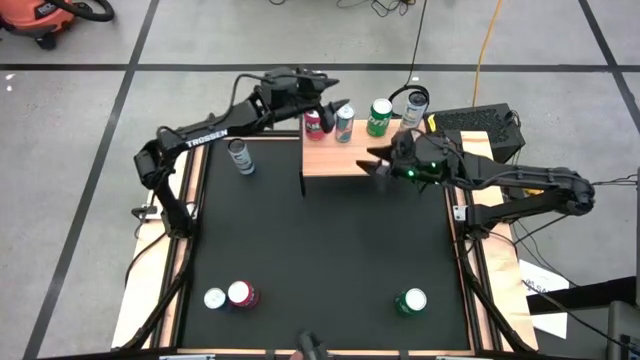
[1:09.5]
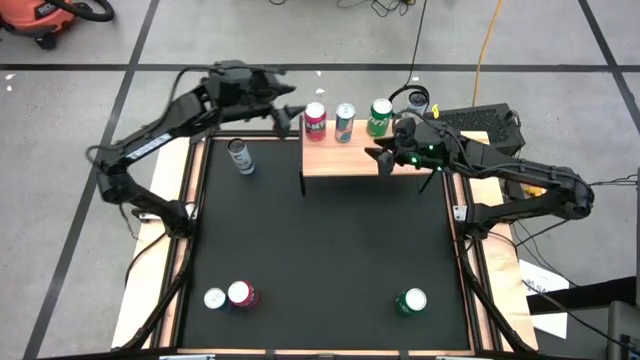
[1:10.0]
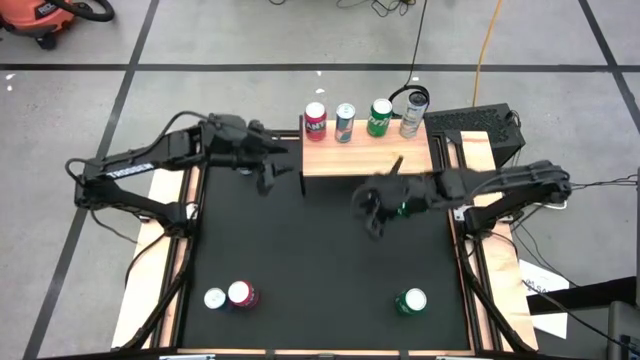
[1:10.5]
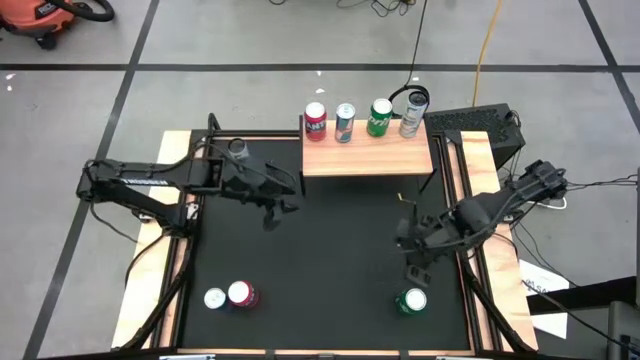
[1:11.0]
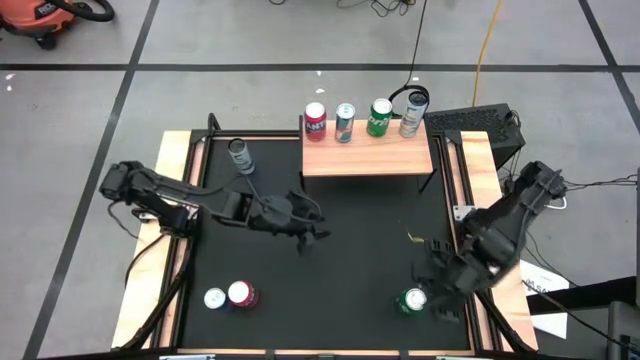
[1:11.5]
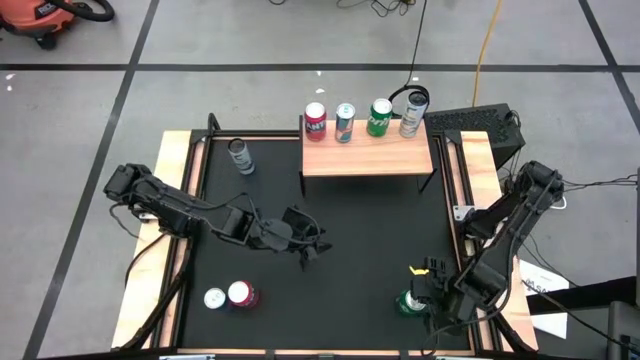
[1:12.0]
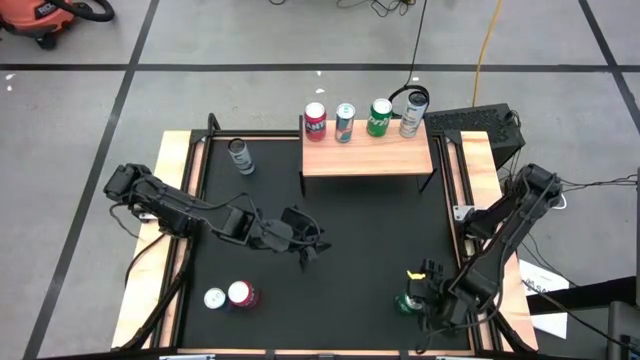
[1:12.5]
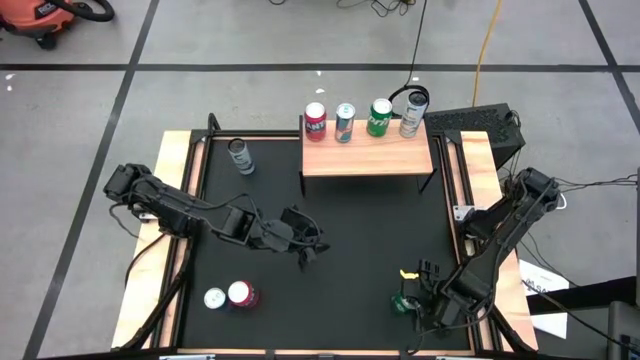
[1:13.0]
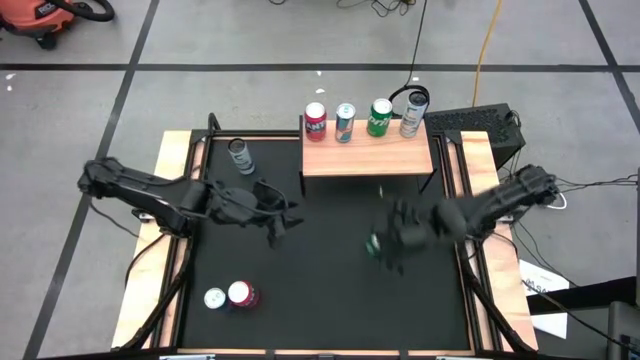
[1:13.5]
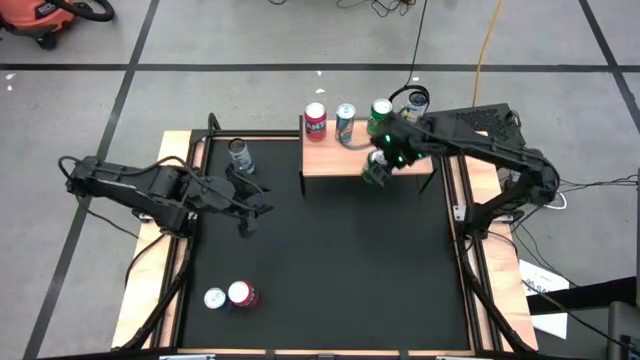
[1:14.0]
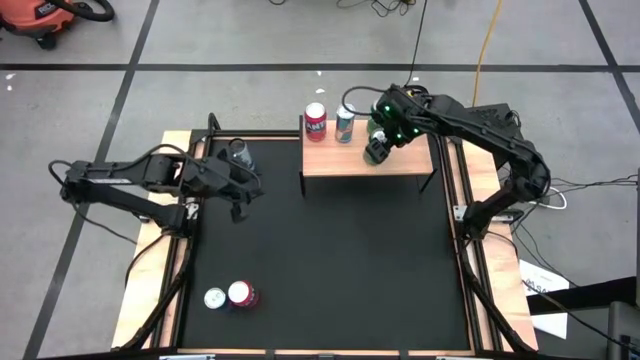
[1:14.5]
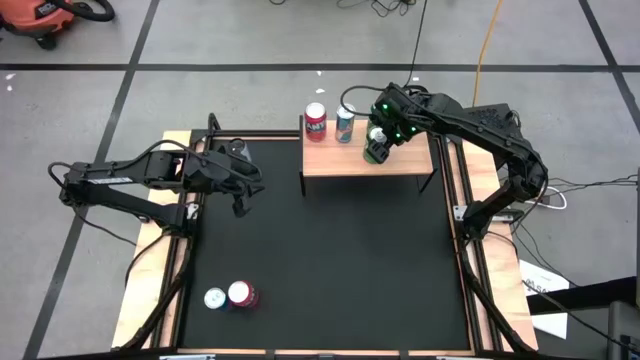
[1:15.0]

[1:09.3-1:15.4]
Task: Place canned beverage on shelf
Put the green soda can on the shelf aligned with the other green soda can

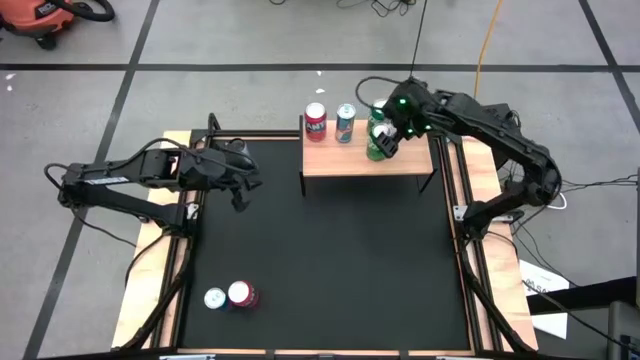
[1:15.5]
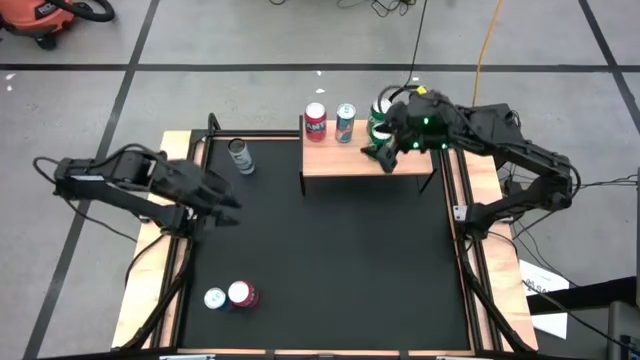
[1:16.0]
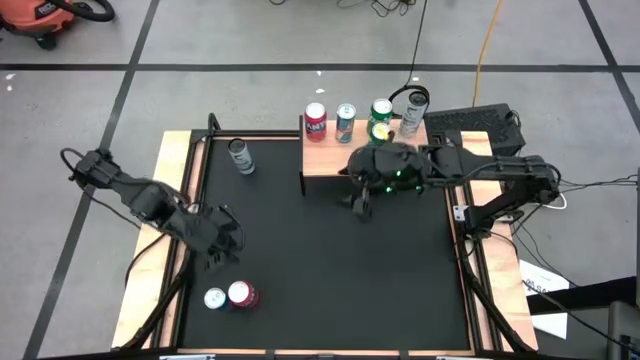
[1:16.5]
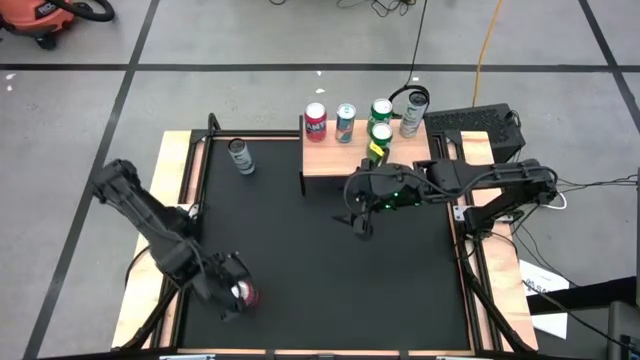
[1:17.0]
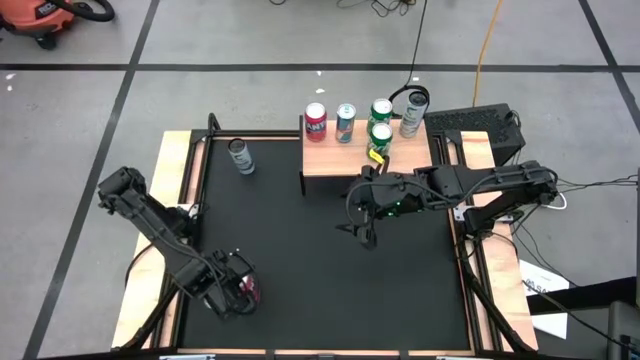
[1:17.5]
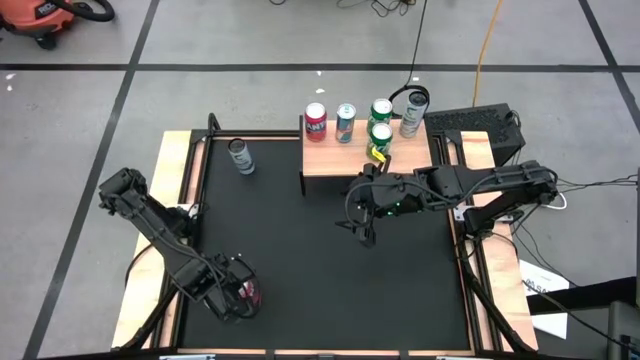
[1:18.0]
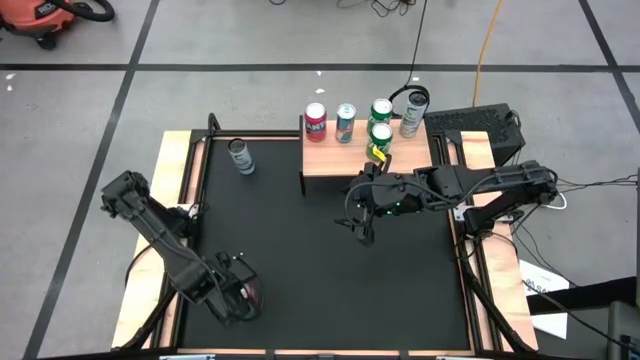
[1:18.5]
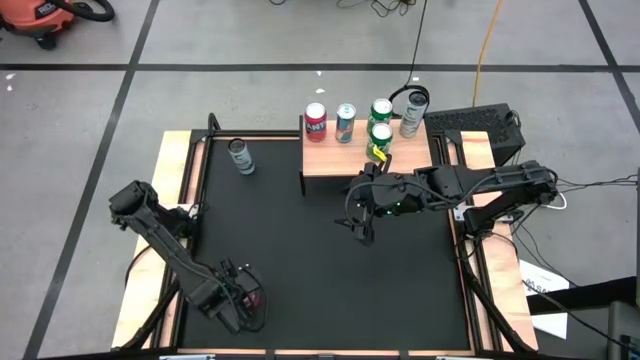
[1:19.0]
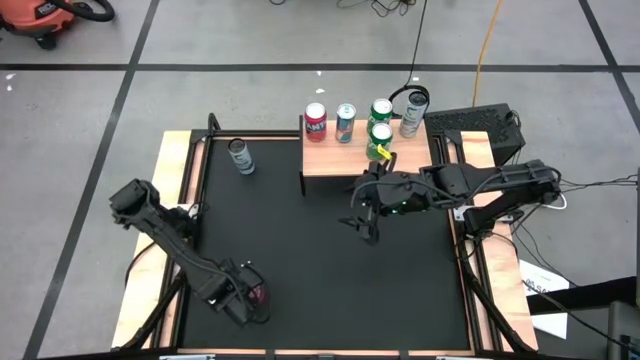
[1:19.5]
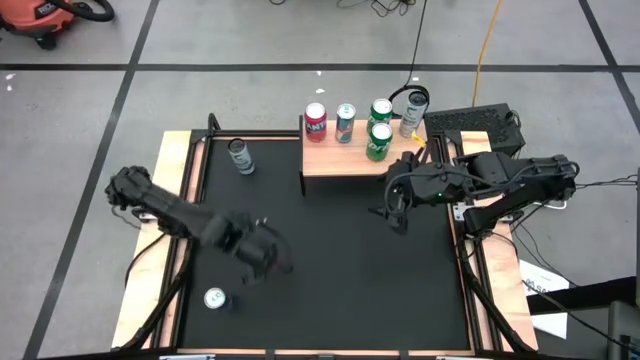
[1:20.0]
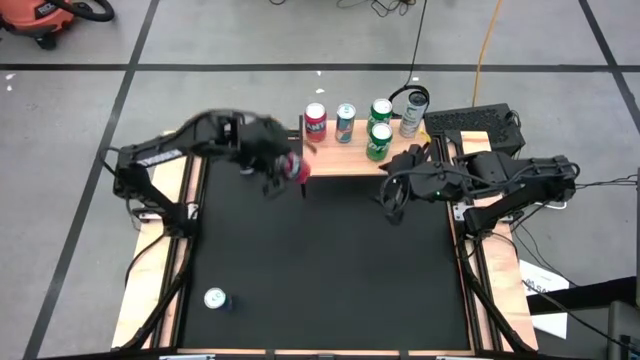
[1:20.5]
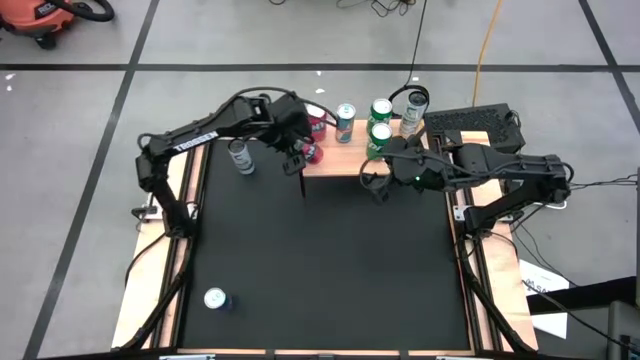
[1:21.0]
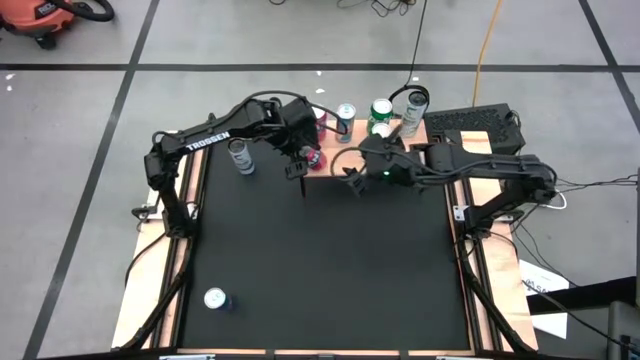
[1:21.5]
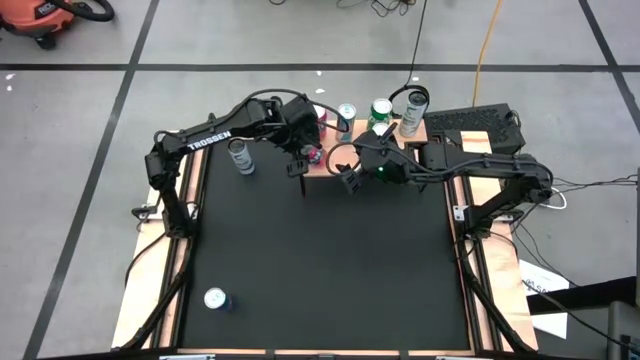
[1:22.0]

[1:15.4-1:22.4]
Put the red soda can on the shelf aligned with the other red soda can

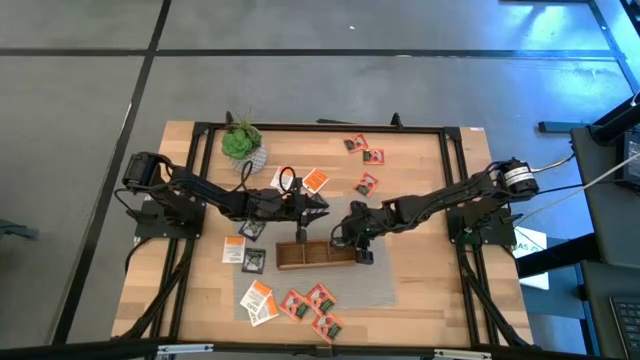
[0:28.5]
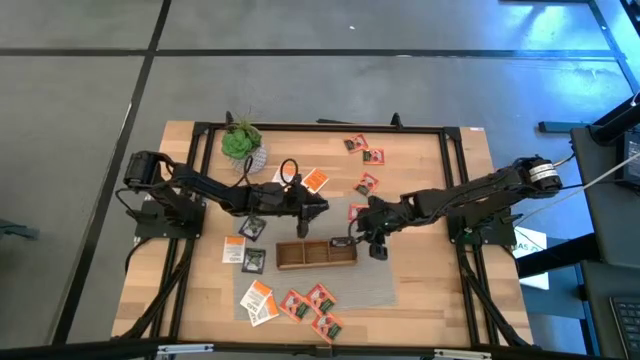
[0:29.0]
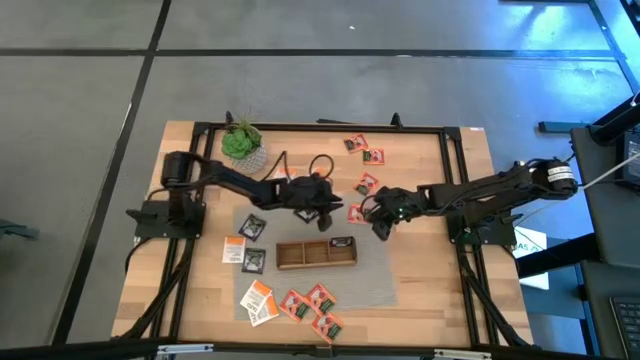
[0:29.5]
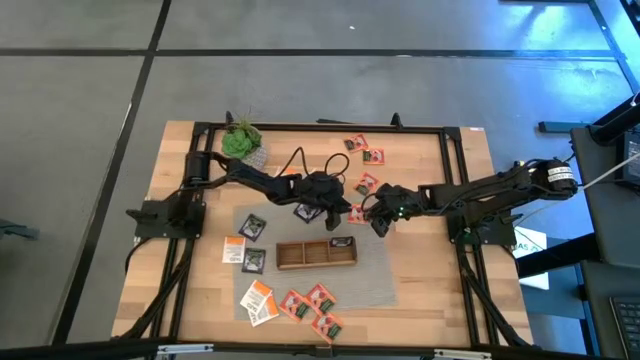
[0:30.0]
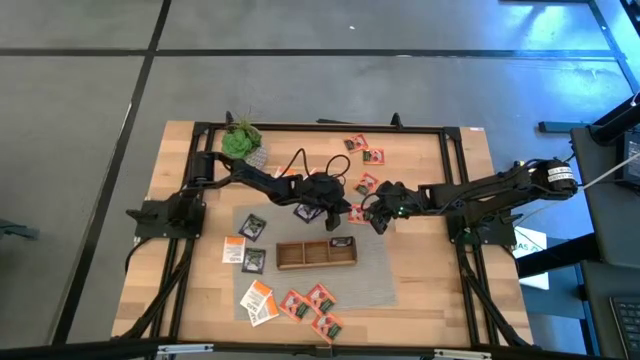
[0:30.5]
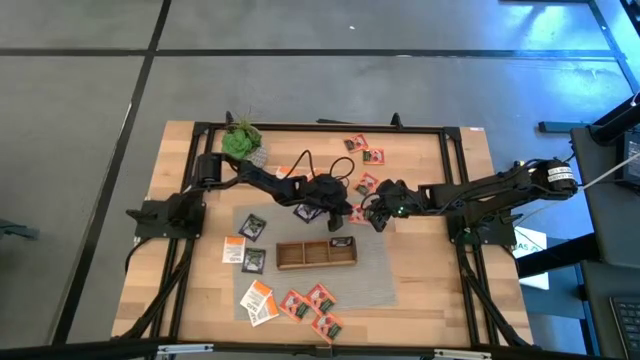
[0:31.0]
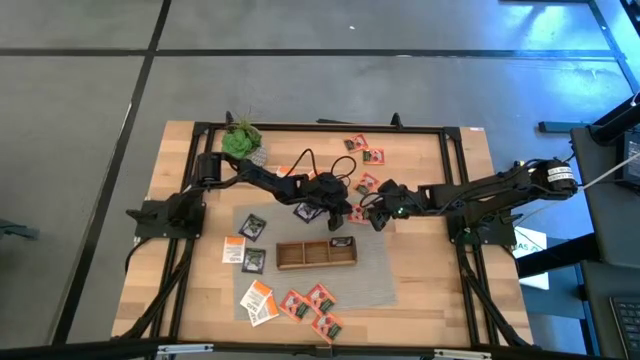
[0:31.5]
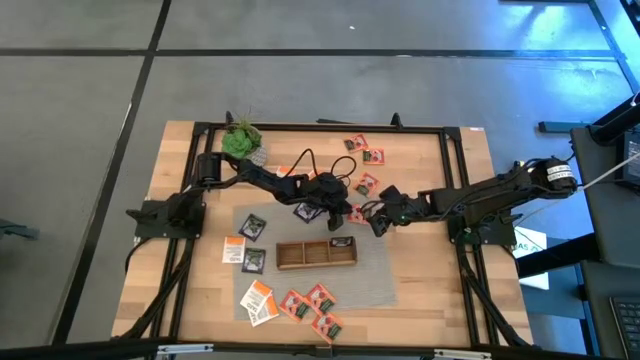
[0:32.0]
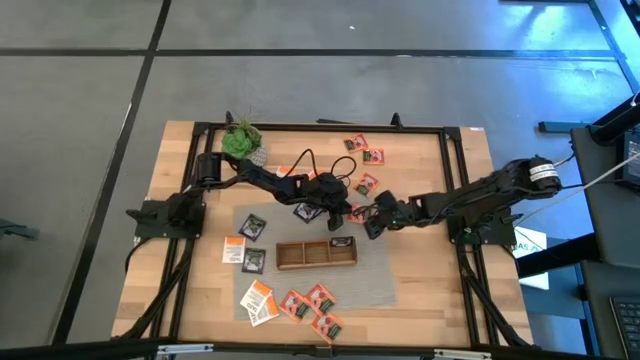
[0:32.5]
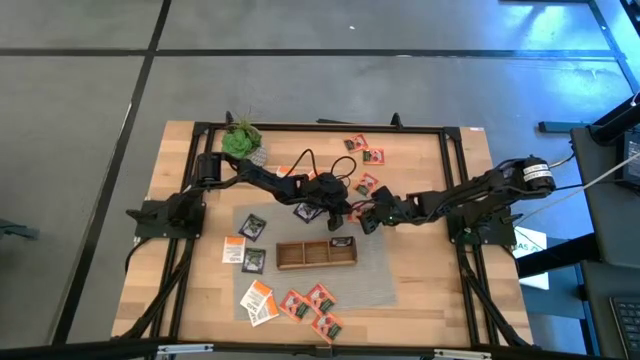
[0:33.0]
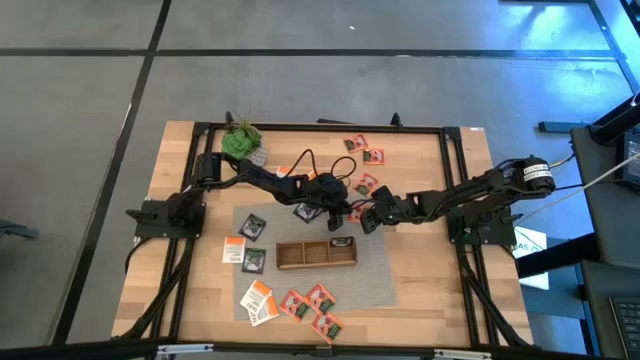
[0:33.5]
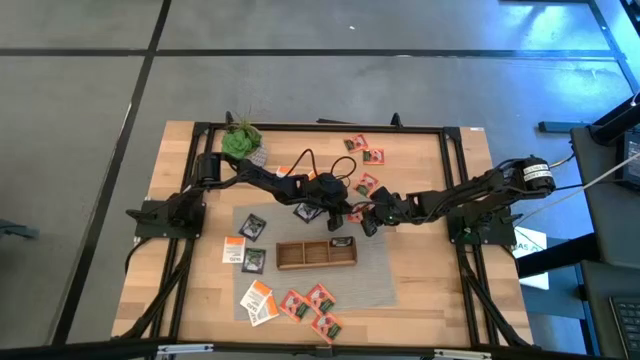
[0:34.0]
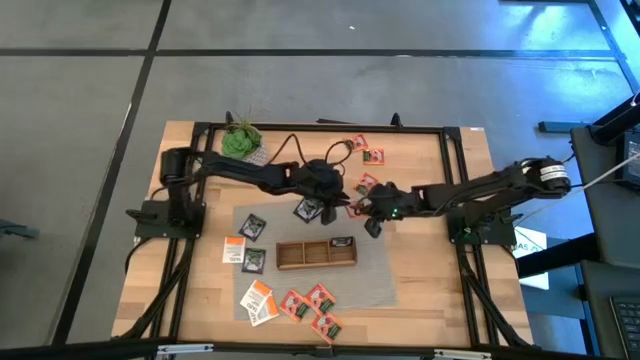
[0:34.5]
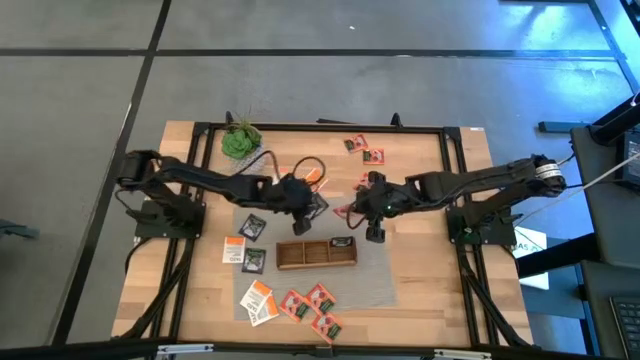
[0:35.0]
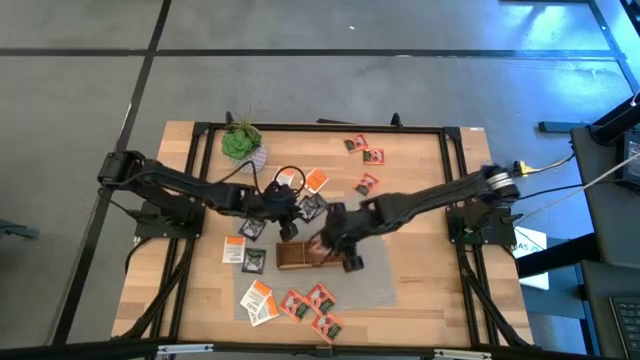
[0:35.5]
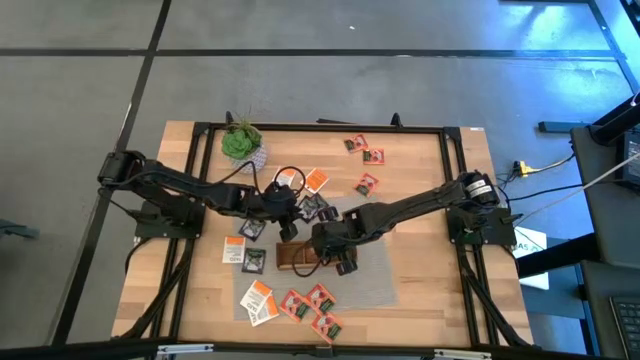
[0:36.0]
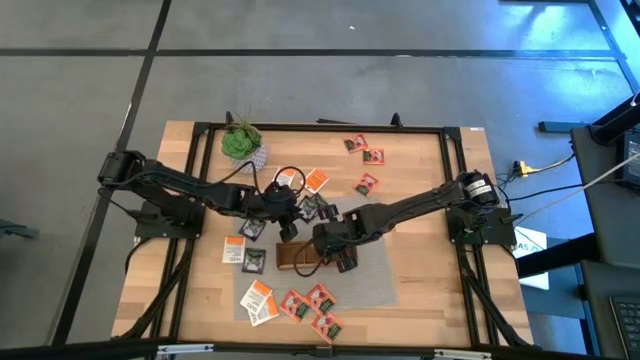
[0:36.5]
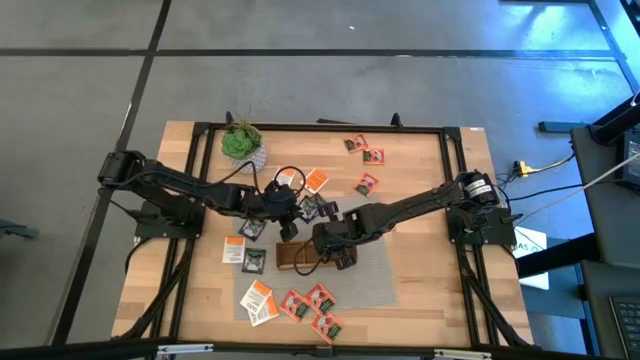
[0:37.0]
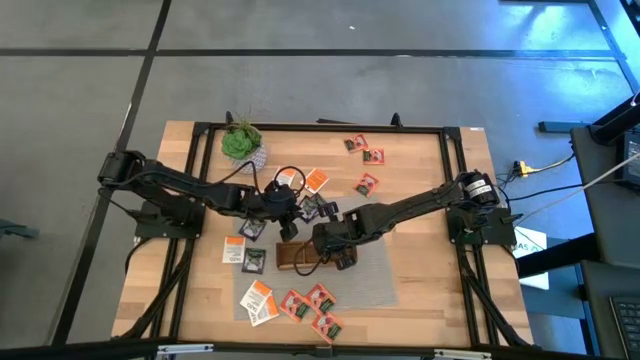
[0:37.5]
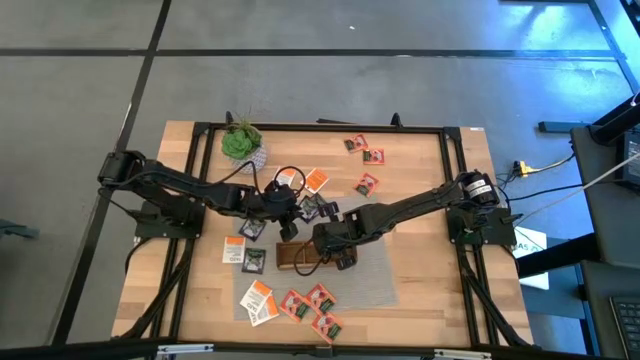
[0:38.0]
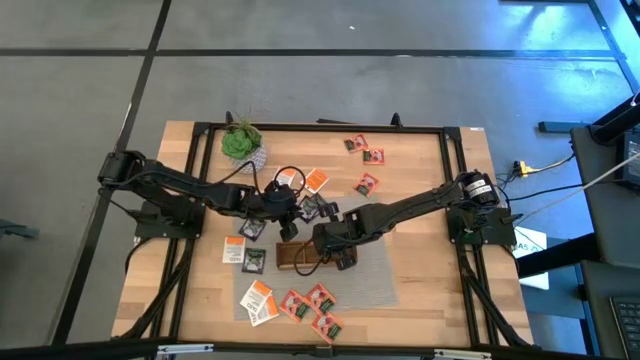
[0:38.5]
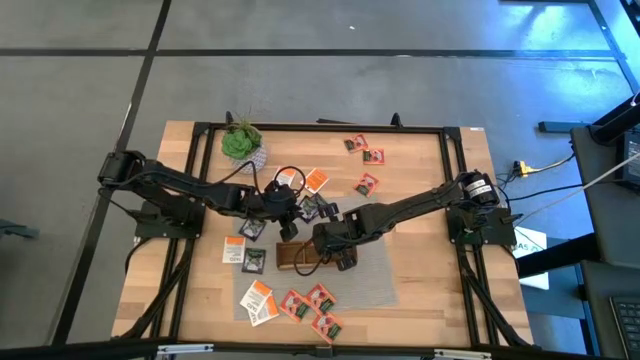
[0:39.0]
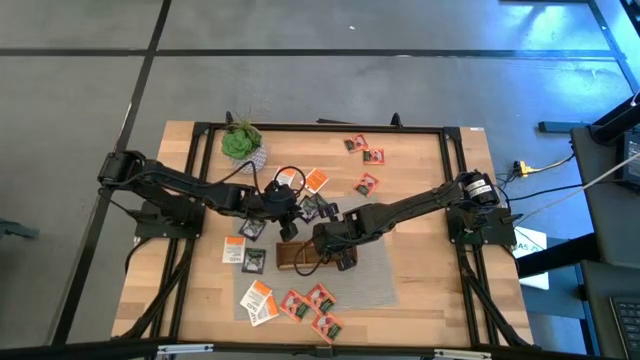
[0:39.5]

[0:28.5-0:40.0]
Task: Pick & Place Tea
Put the orange tea bag into the middle section of the wooden organizer
